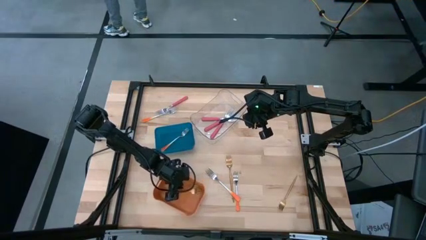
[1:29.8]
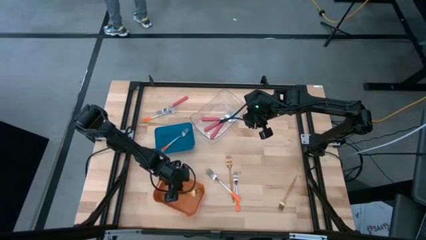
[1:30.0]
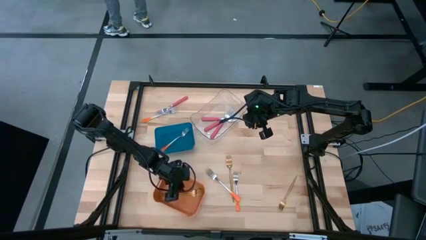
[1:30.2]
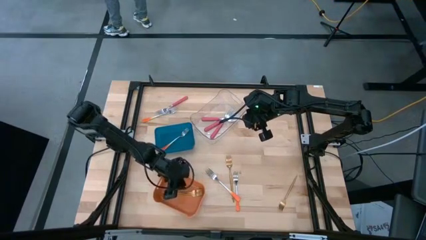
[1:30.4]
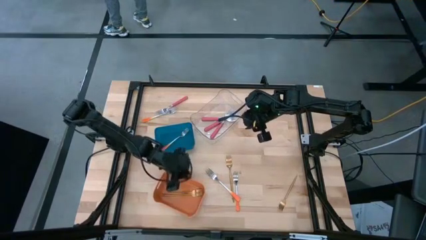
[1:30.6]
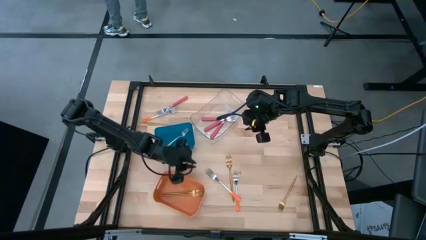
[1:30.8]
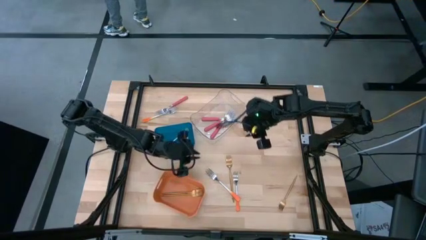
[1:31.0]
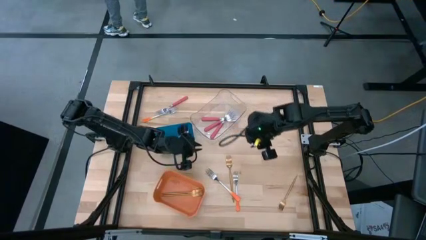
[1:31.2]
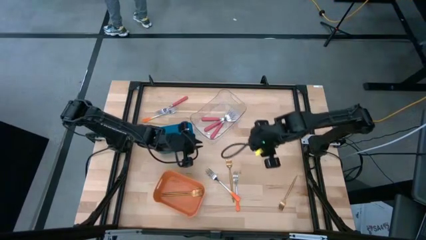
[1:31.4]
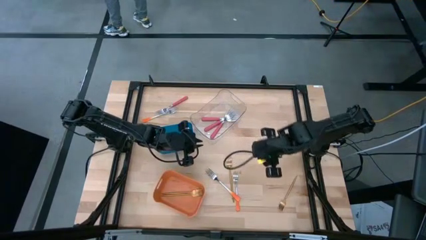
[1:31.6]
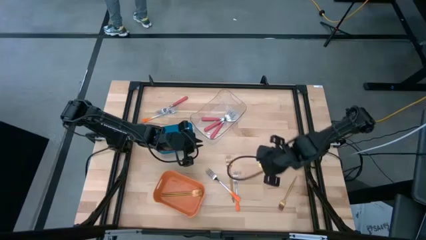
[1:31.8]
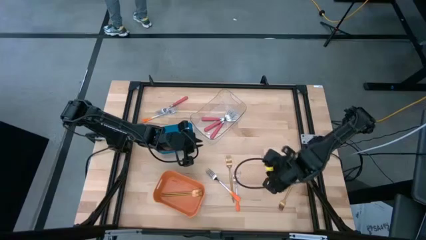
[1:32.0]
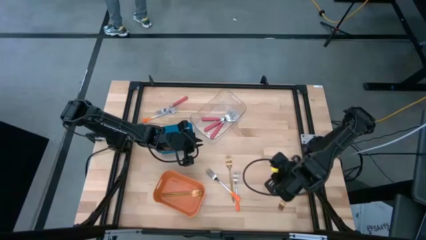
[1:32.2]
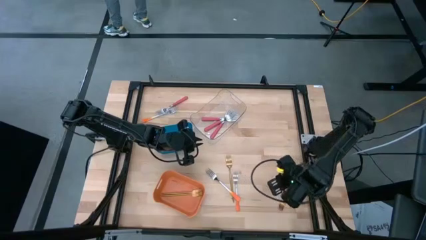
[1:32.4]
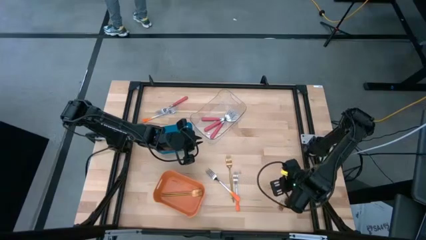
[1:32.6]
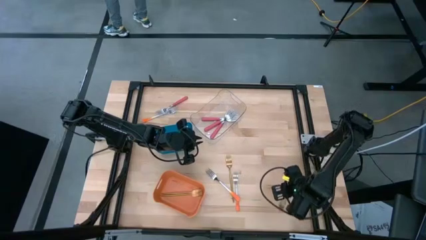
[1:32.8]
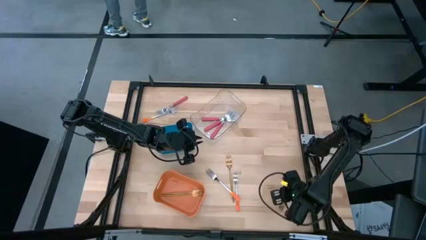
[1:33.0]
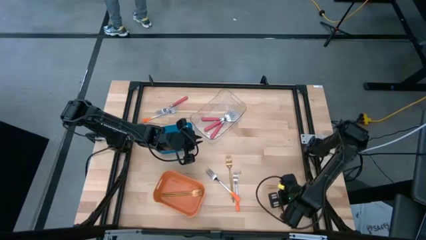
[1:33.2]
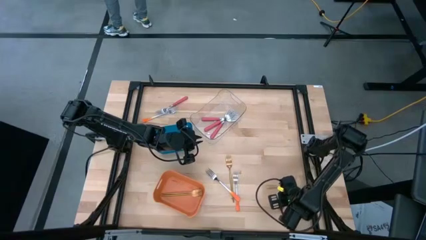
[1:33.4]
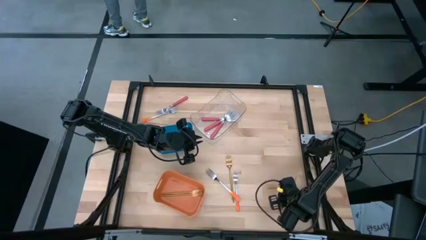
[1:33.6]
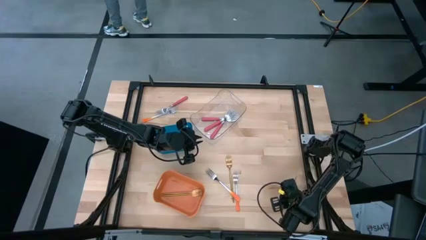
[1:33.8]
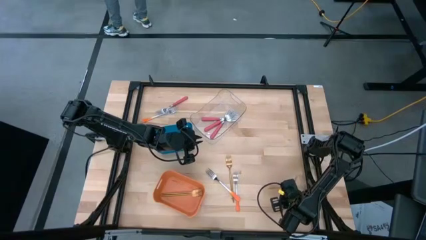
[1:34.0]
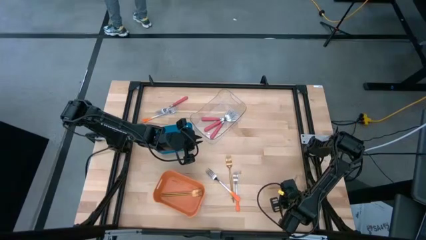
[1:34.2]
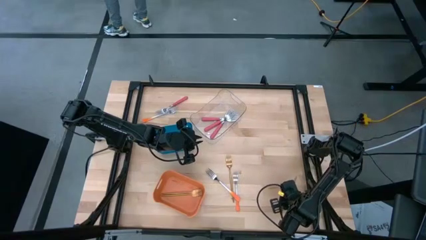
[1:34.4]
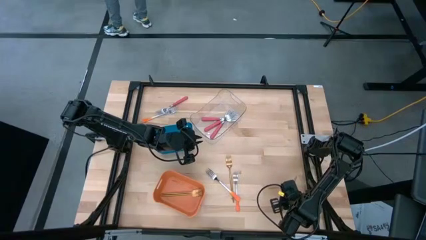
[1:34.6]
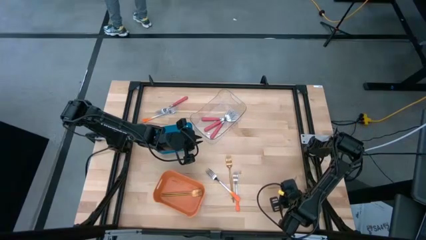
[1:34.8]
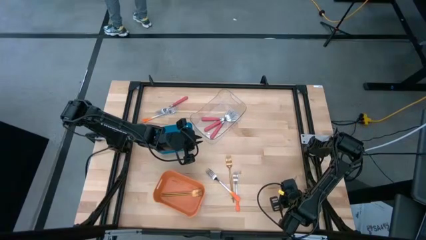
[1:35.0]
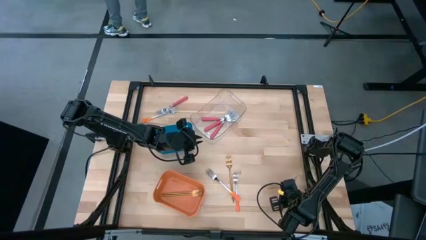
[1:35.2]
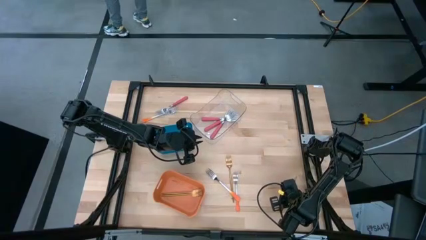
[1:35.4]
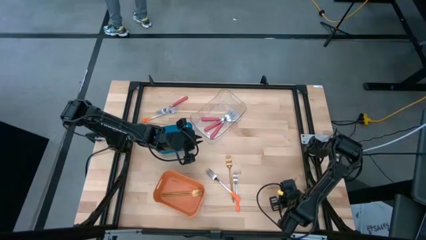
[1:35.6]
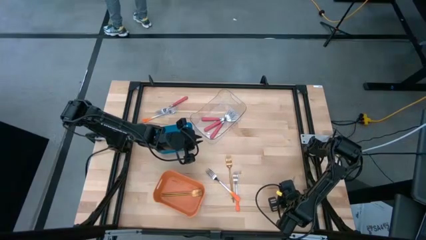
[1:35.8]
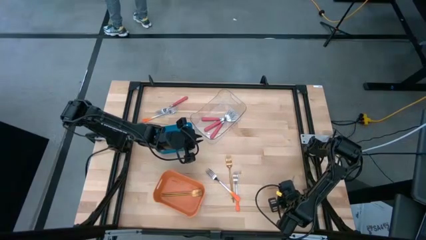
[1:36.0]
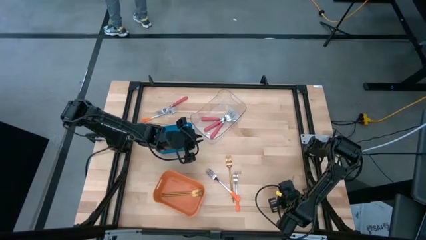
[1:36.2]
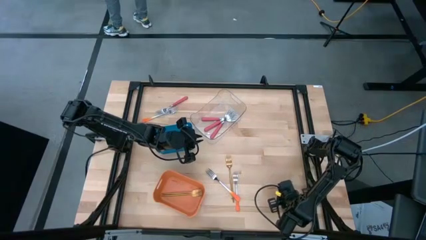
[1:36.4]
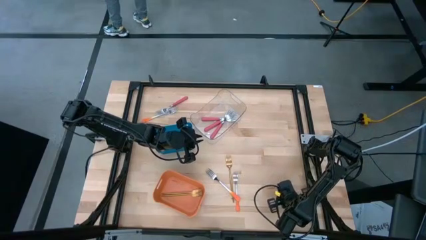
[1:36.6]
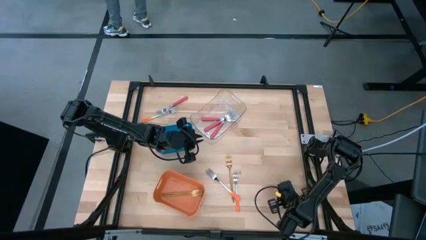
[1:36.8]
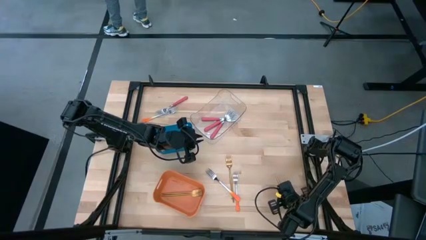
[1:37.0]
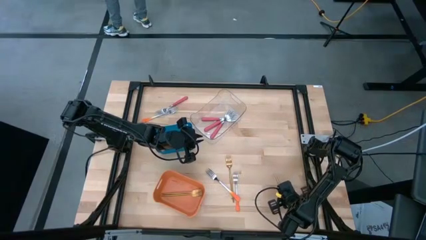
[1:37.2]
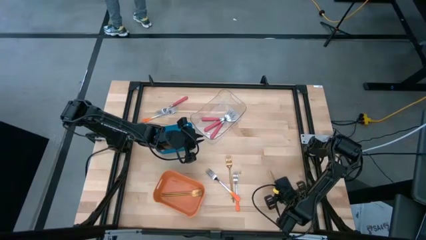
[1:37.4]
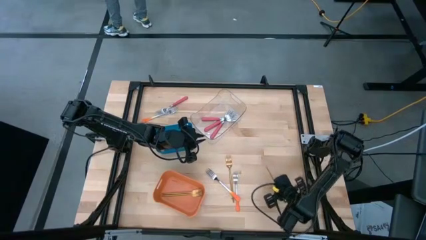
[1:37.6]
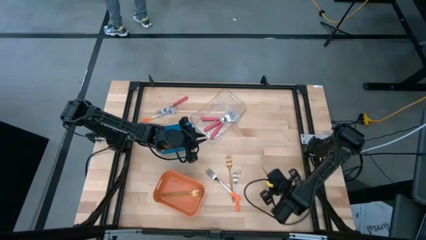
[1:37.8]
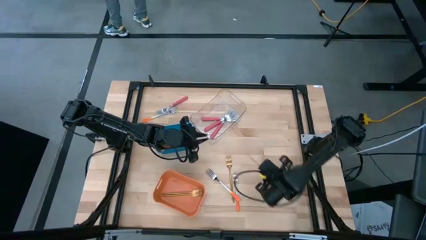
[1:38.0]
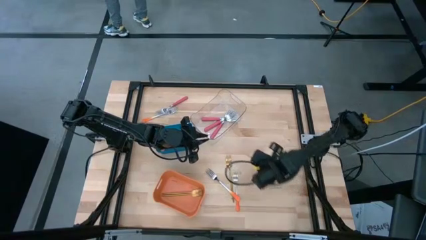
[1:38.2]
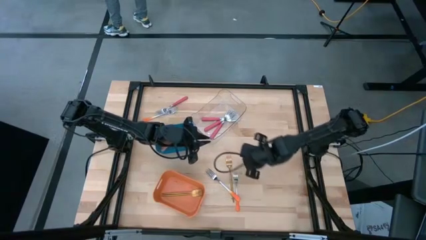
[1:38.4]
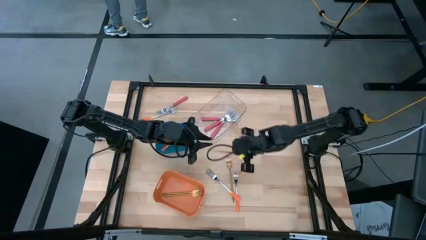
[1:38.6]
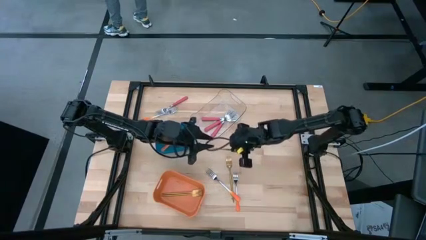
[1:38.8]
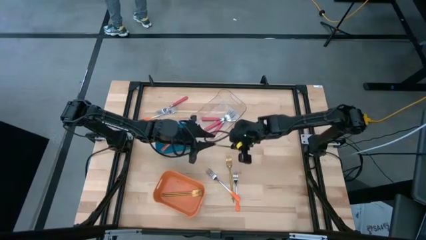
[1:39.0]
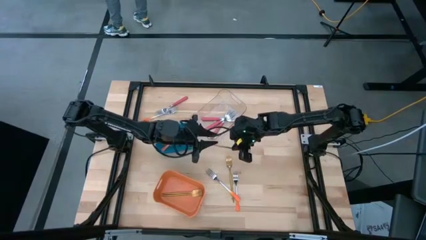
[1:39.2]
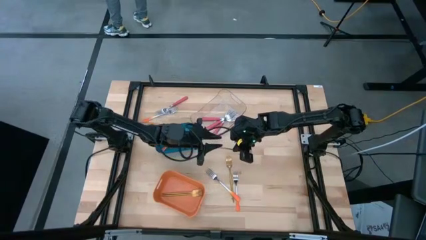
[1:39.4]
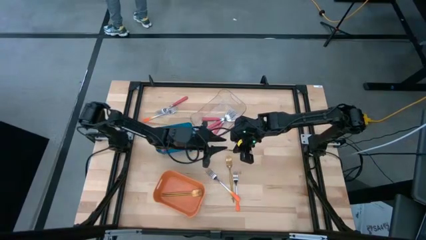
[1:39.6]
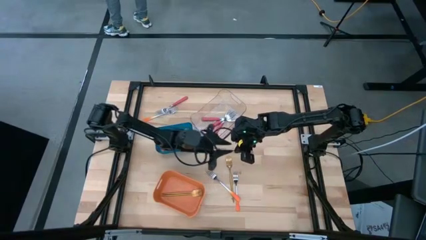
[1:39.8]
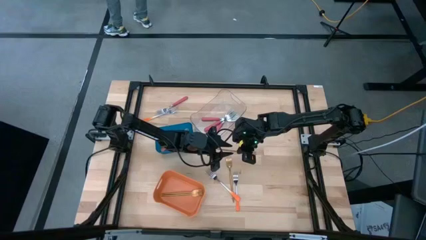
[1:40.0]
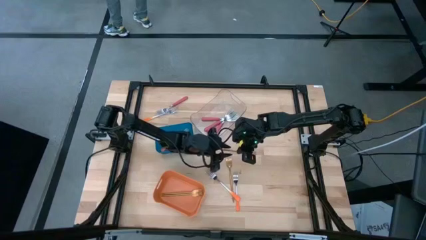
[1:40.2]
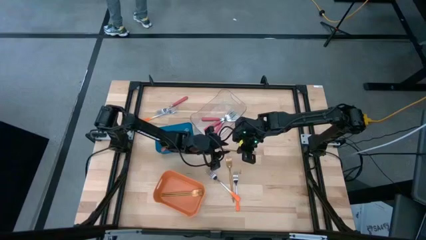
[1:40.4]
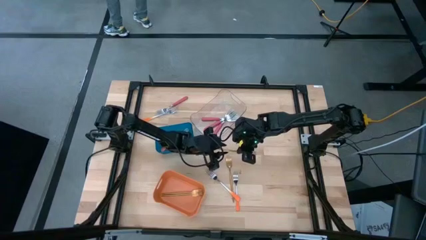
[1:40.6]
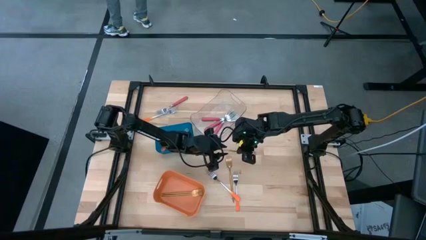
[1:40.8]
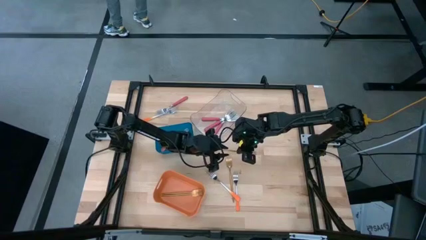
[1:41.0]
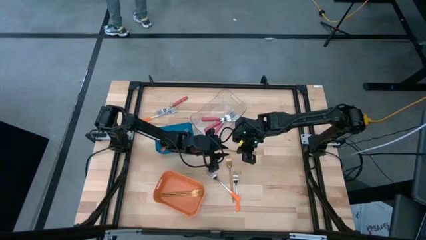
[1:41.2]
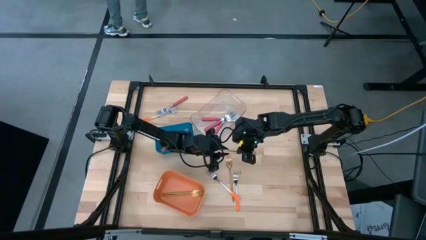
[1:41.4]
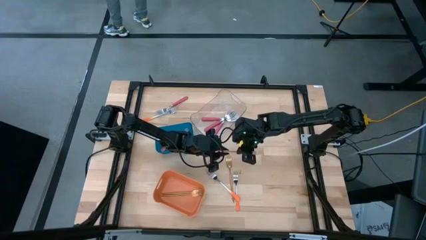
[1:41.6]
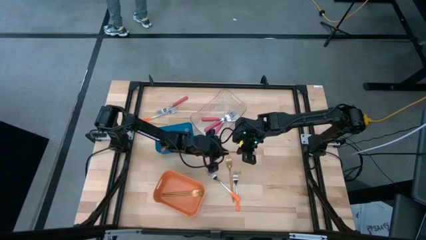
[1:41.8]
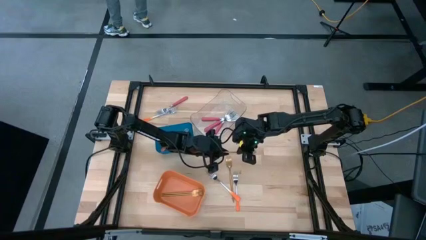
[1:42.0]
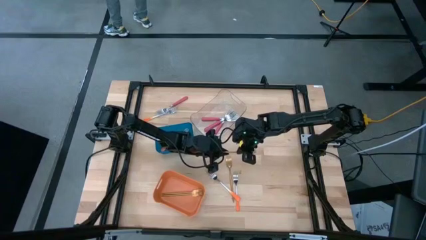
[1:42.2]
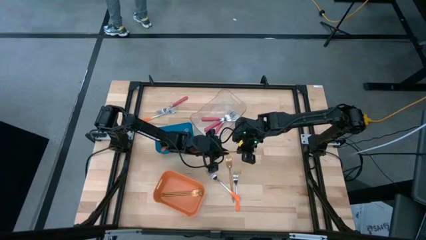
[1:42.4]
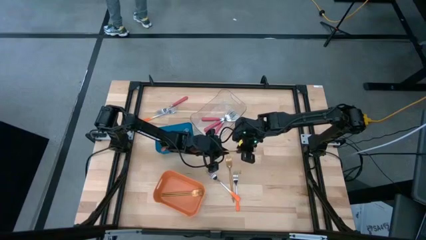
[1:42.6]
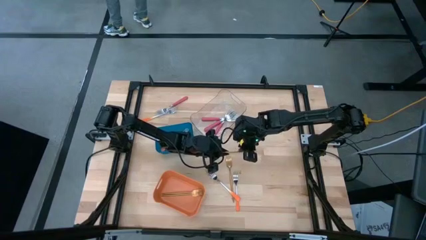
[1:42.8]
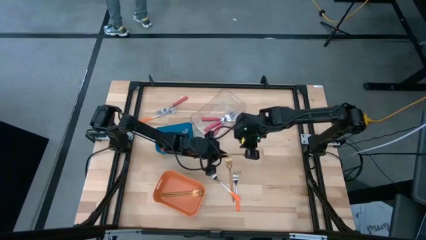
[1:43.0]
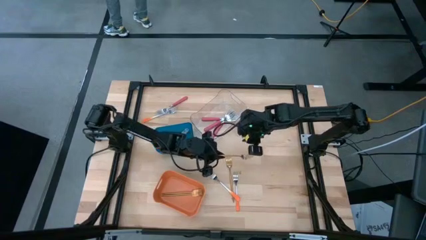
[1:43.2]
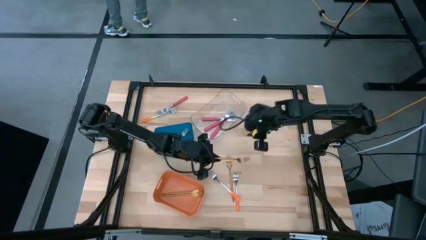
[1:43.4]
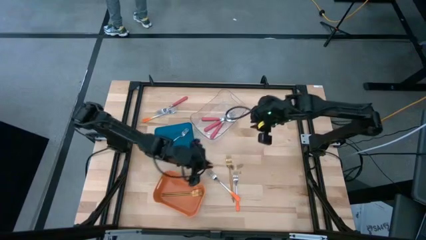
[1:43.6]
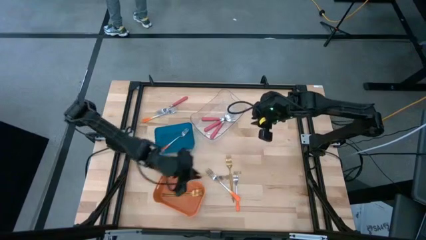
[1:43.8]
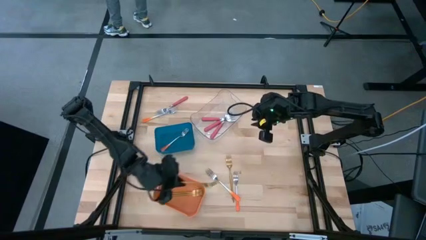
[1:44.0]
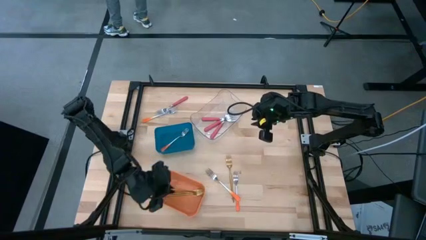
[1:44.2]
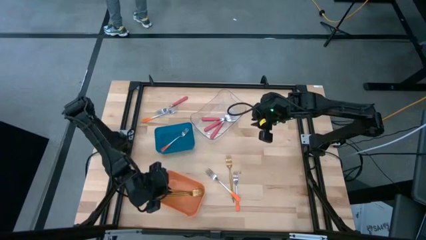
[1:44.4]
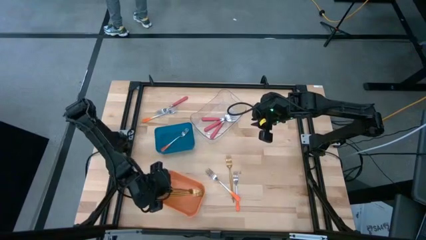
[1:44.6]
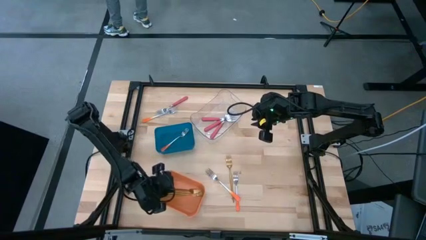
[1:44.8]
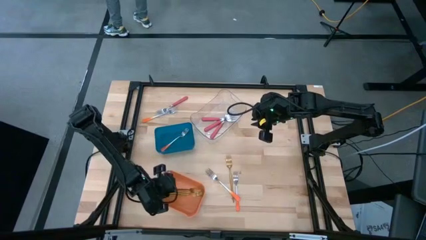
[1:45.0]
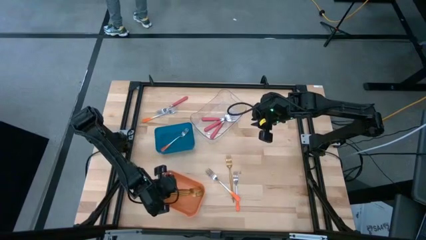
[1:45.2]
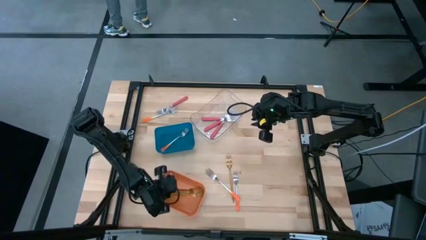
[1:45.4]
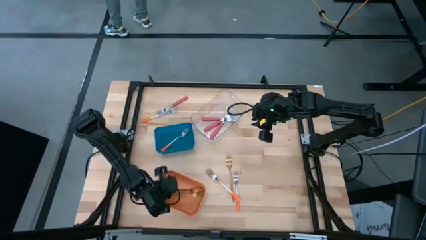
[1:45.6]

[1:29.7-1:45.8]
Task: Sort silverware by color (type)
Put the gold fork into the orange bin
